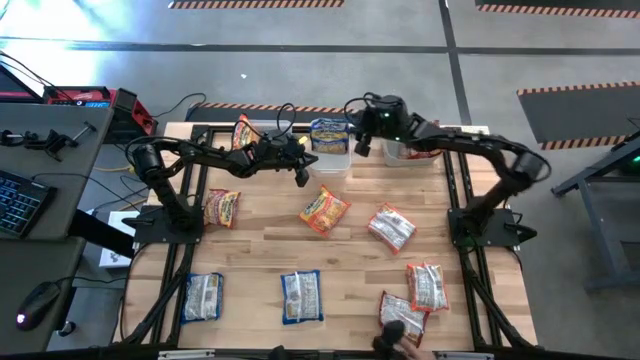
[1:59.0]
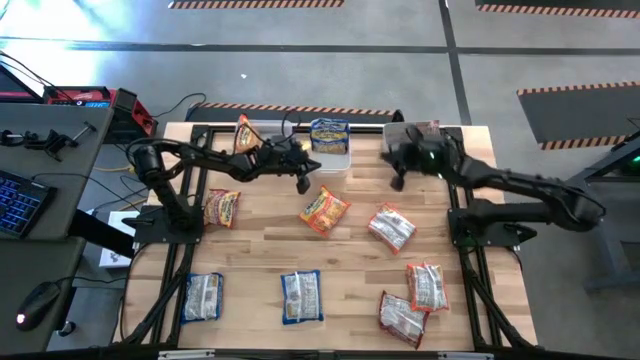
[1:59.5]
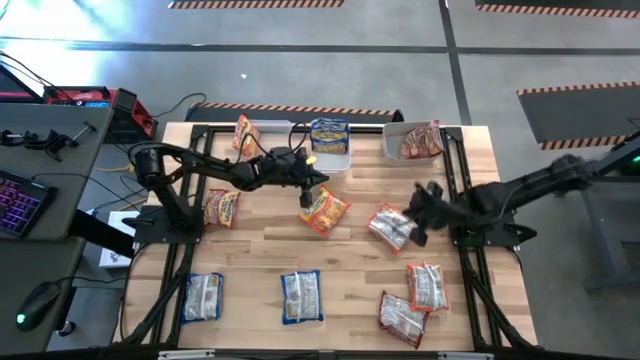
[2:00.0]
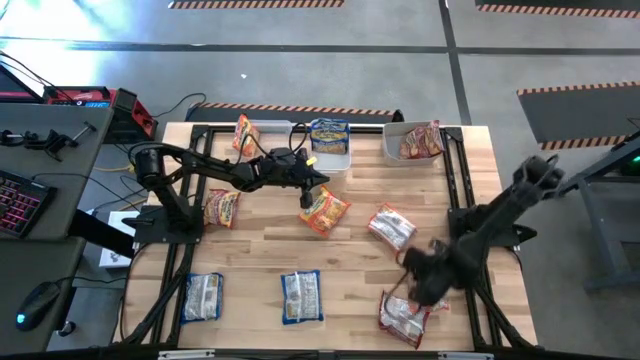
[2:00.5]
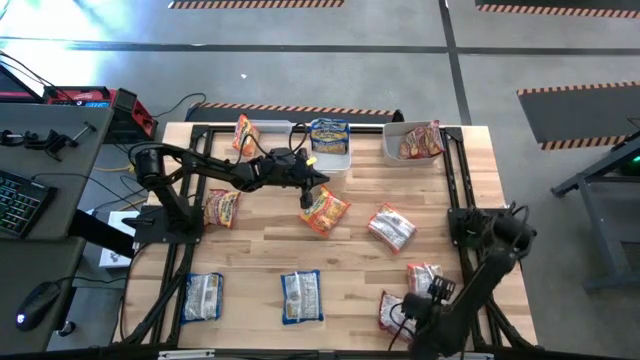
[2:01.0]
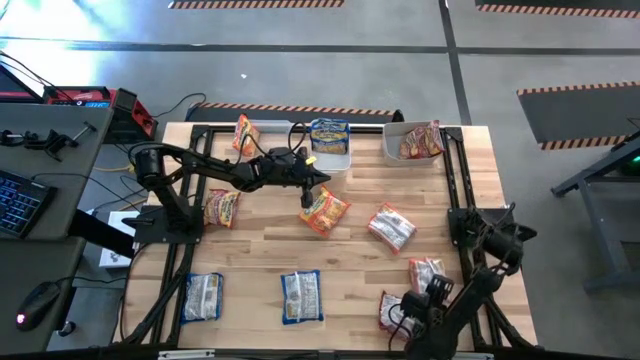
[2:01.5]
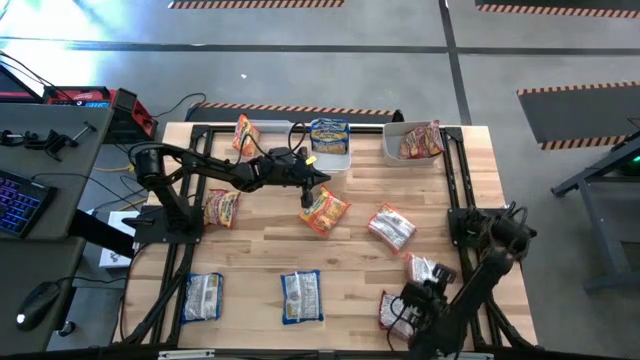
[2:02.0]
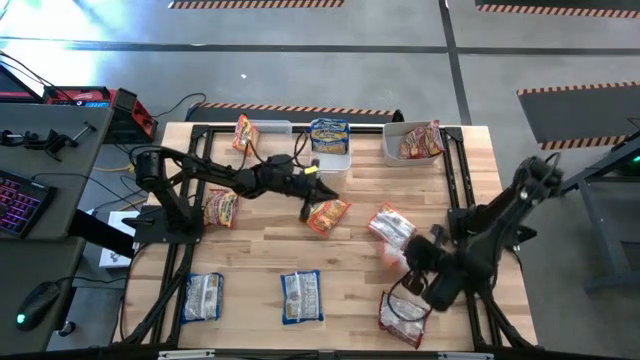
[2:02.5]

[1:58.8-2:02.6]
Task: Sort Maruchan noodles
Put the bottom orange noodle pack into the transparent bin

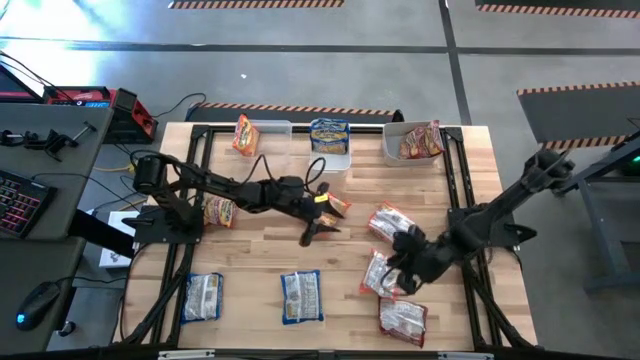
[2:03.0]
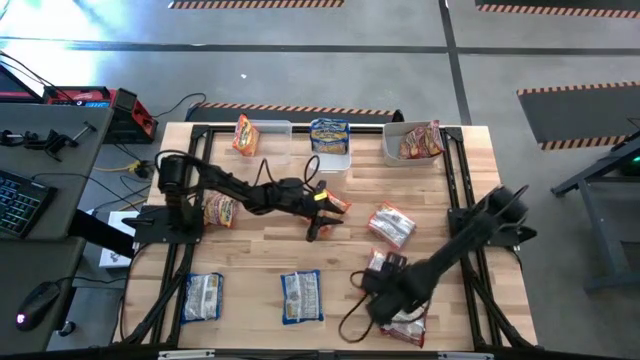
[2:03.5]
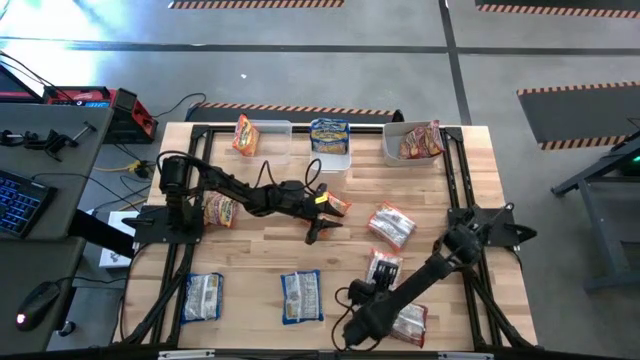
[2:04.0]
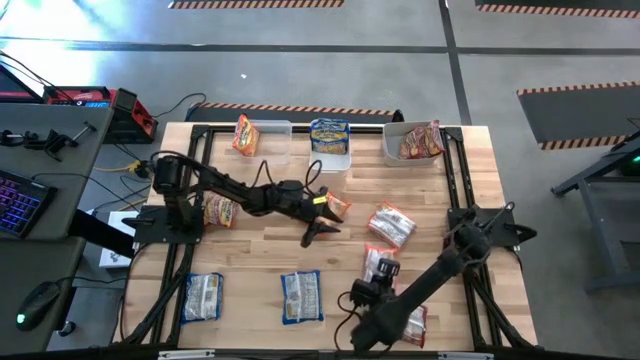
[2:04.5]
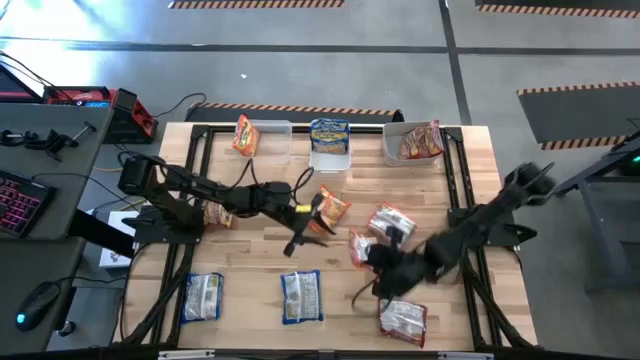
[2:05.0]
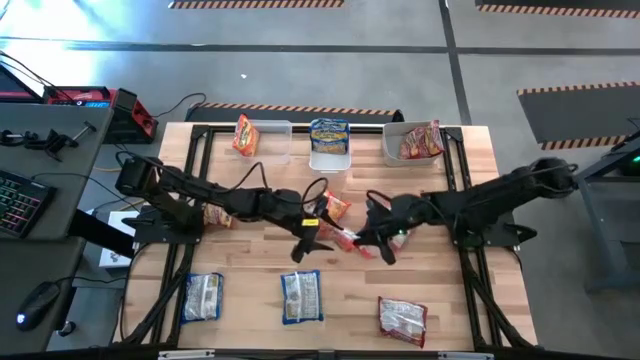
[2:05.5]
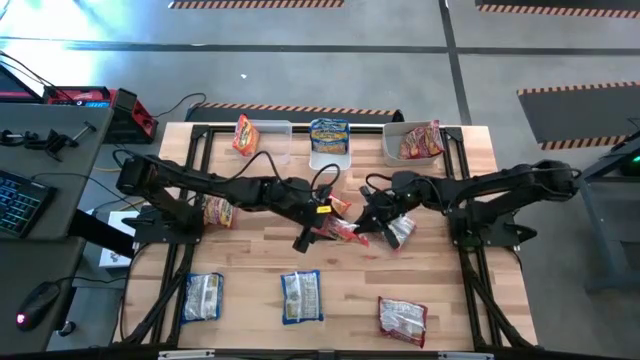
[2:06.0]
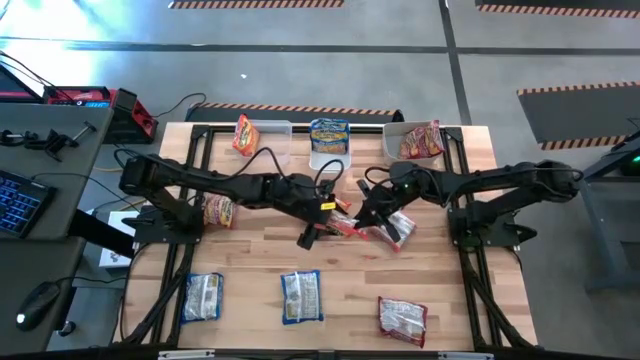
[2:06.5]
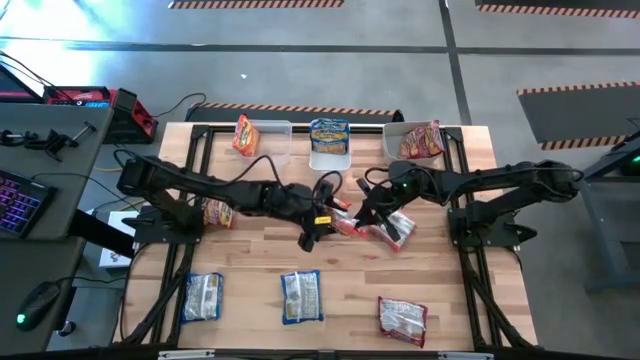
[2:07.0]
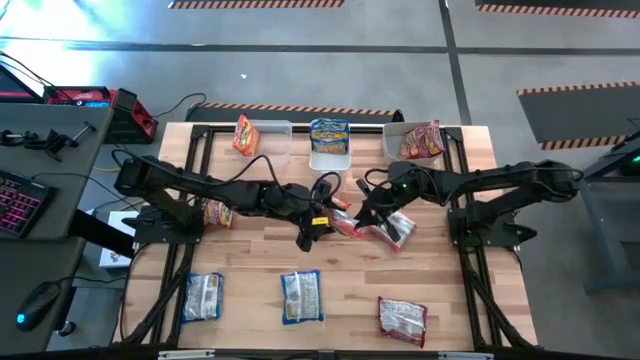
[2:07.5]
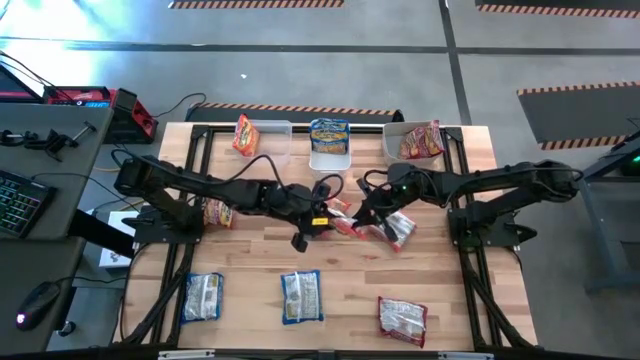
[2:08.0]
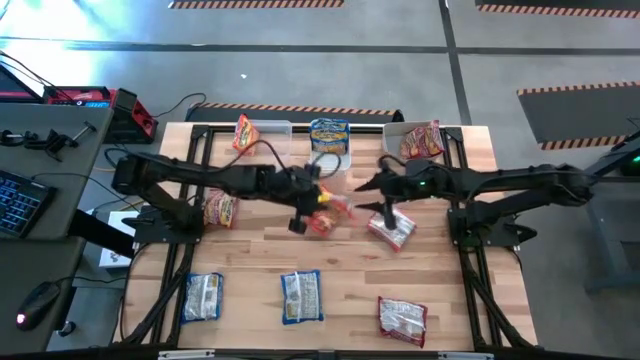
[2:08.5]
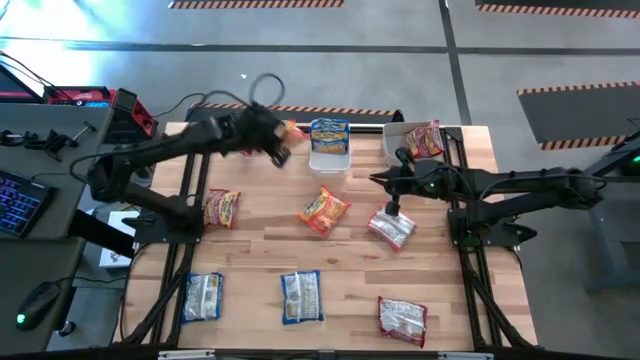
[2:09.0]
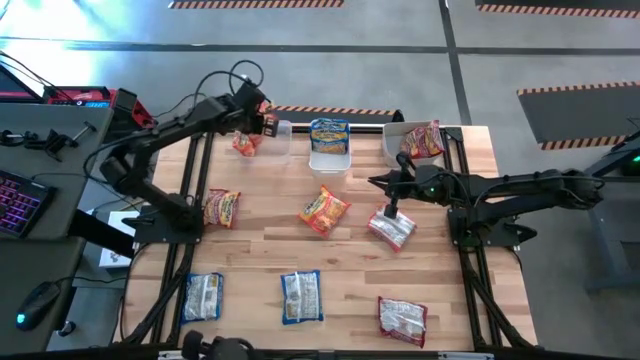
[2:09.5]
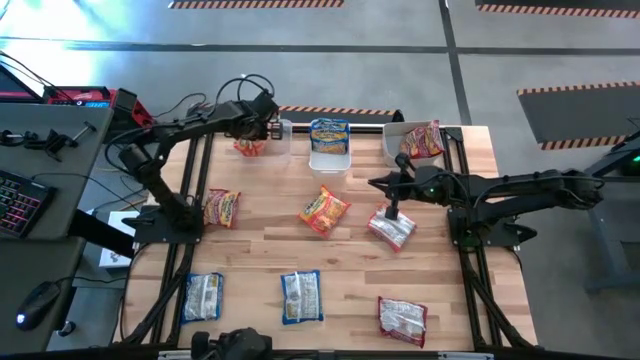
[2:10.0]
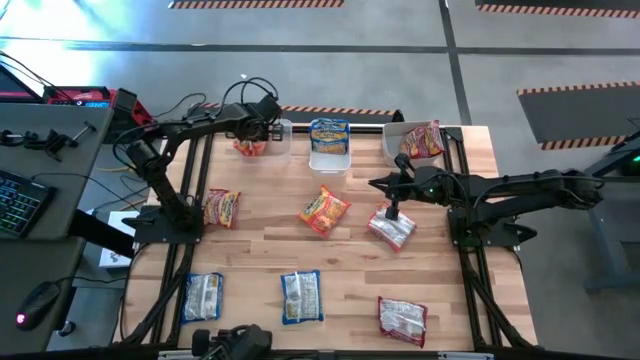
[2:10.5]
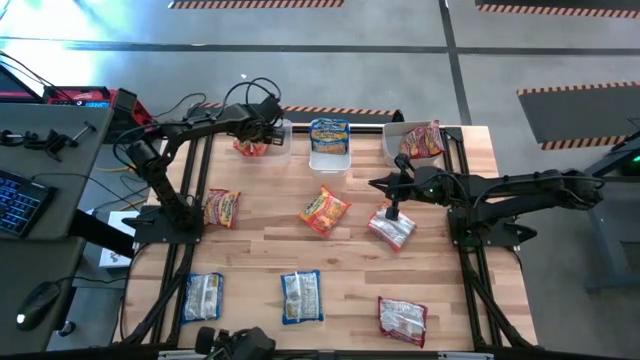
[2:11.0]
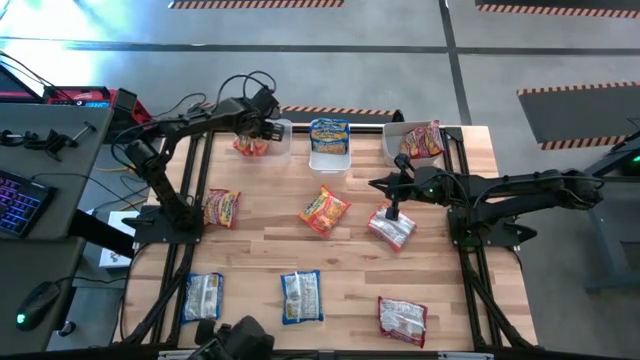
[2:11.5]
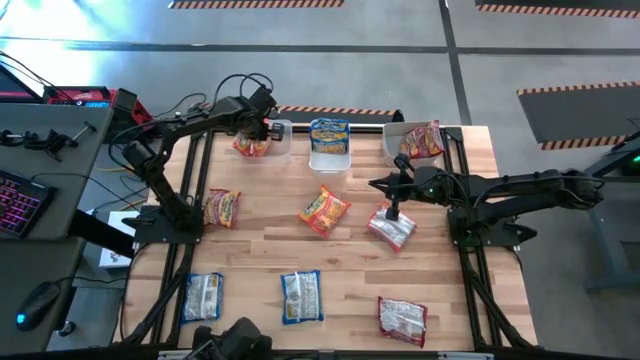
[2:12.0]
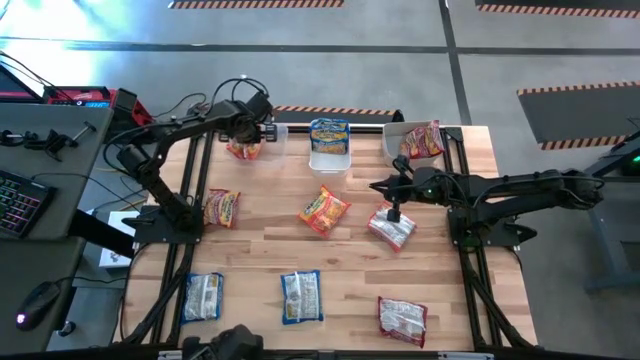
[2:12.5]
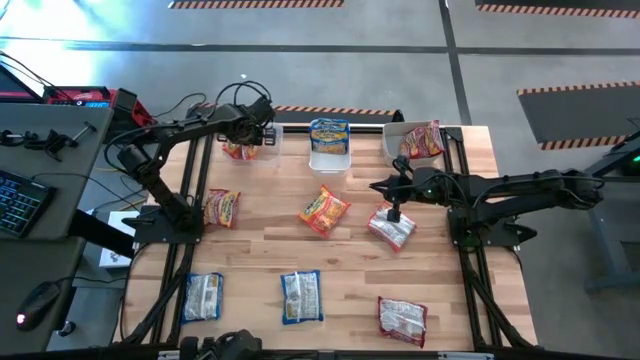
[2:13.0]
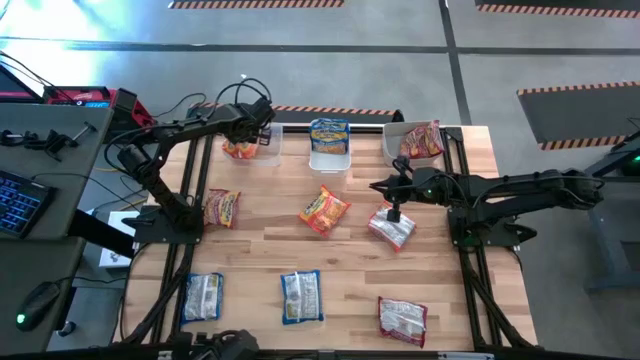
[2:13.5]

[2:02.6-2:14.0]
Put the bottom orange noodle pack into the transparent bin

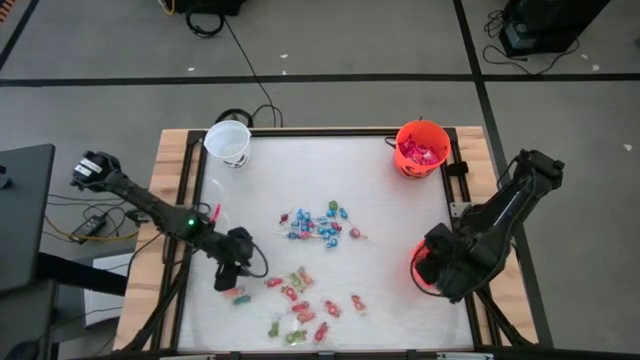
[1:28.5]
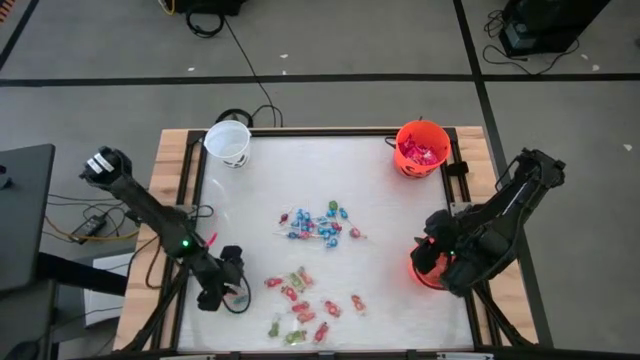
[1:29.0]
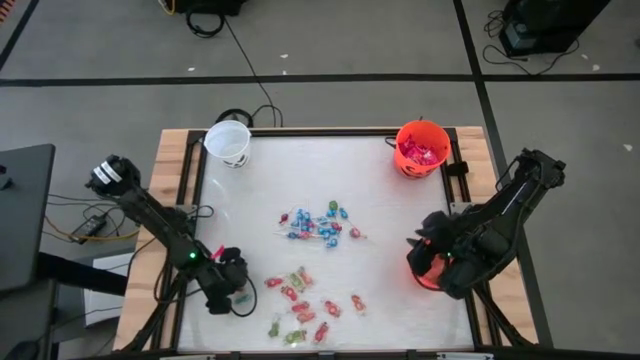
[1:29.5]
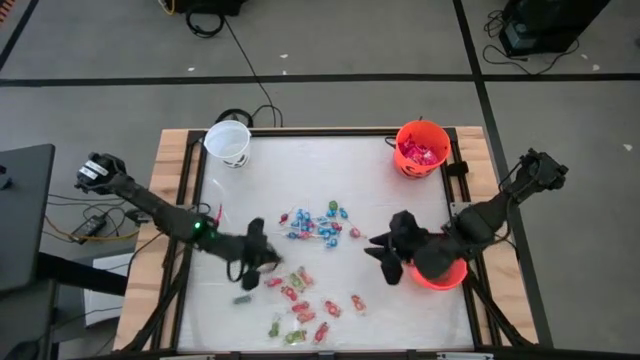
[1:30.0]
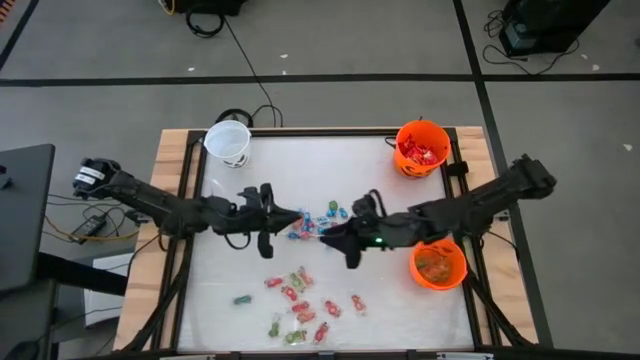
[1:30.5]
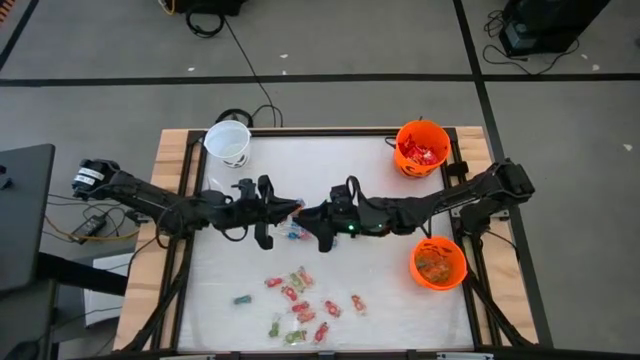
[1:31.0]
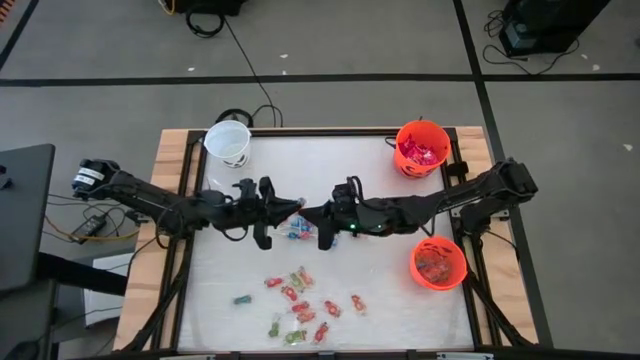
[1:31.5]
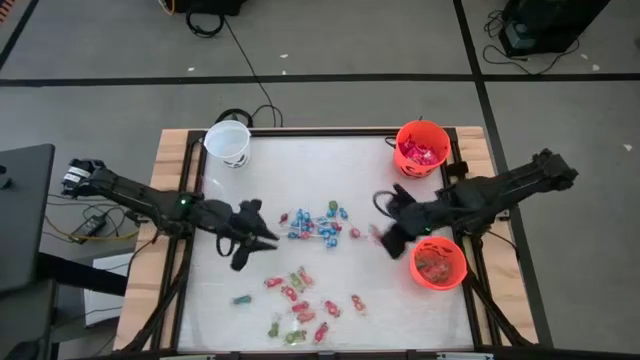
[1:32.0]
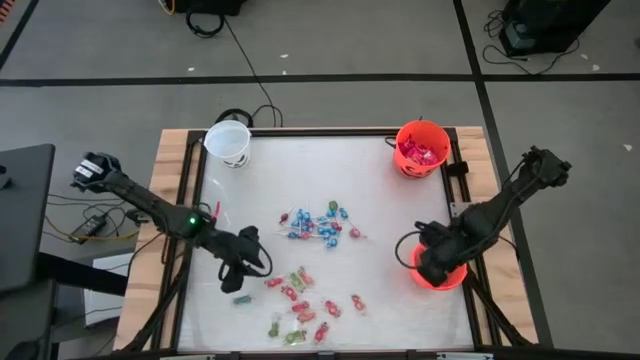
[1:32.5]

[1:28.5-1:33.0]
Task: Sort candy by brand, put in halloween buckets
Put the orange gummy into the bottom orange bucket
